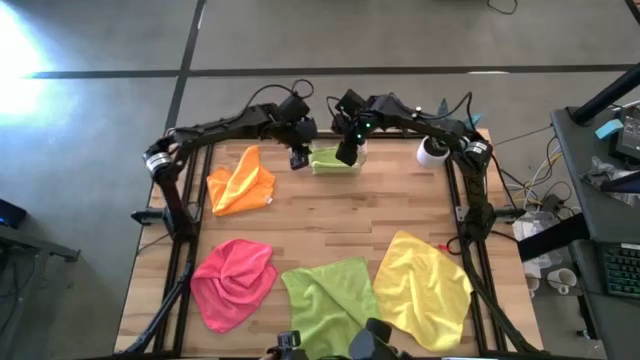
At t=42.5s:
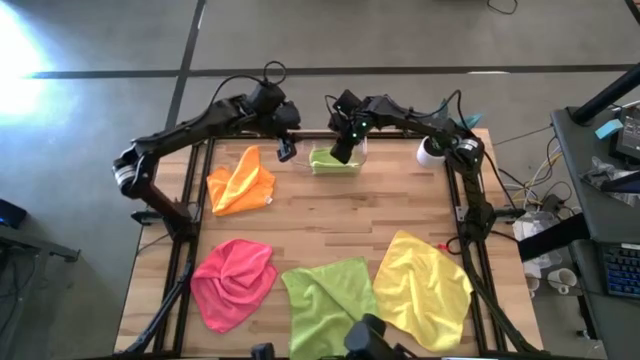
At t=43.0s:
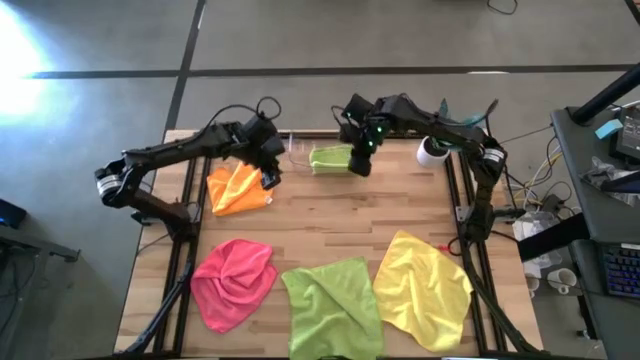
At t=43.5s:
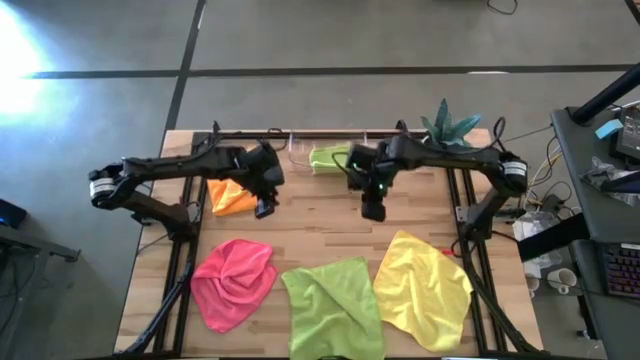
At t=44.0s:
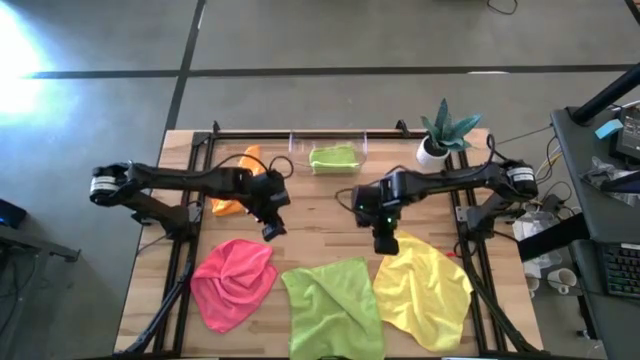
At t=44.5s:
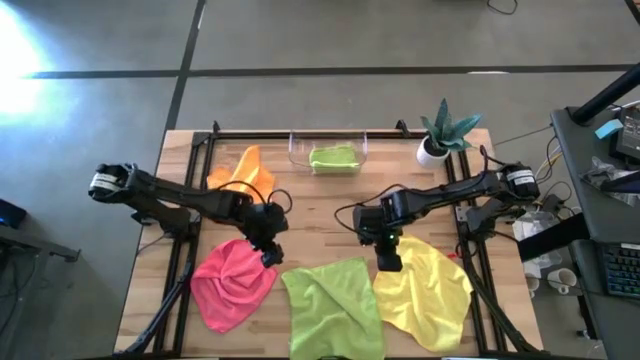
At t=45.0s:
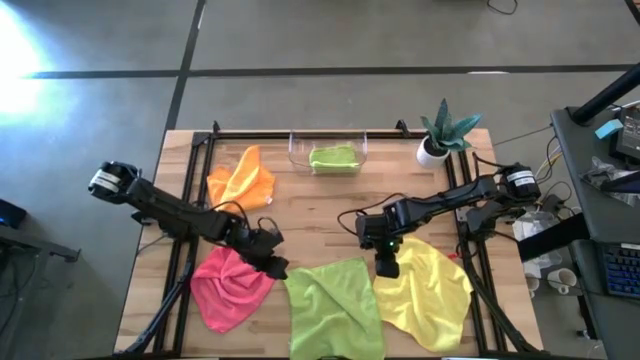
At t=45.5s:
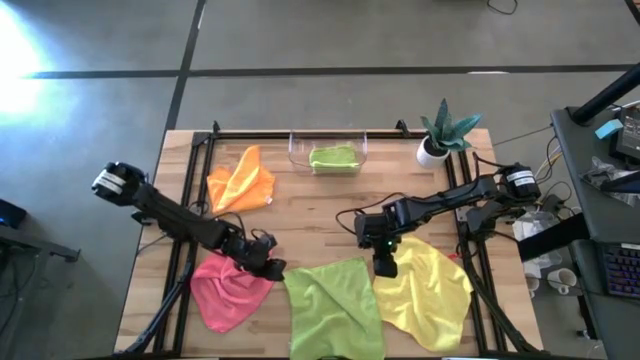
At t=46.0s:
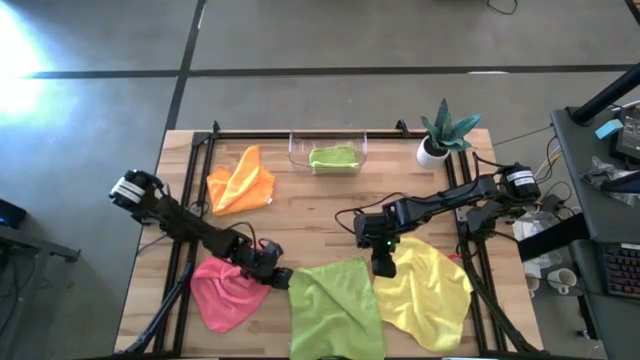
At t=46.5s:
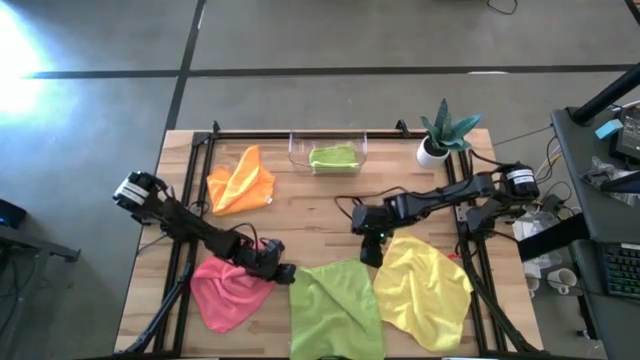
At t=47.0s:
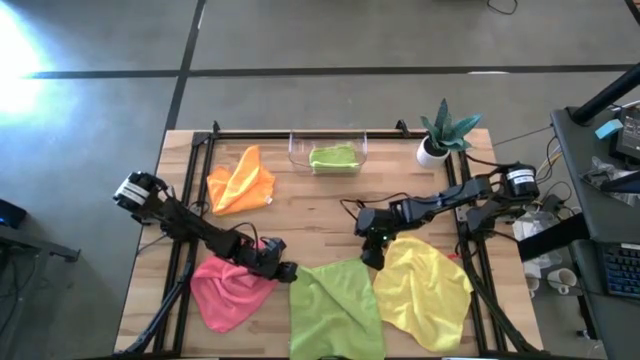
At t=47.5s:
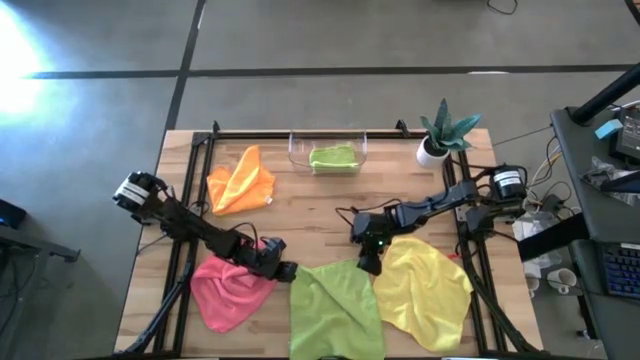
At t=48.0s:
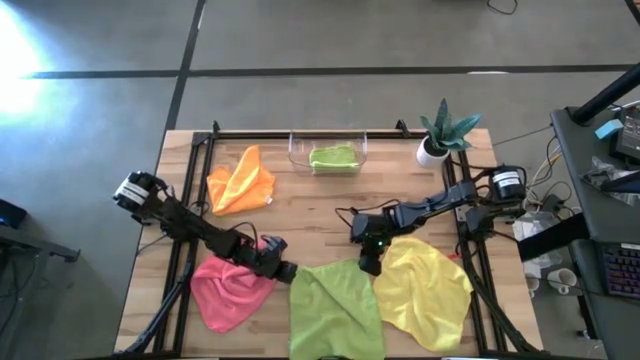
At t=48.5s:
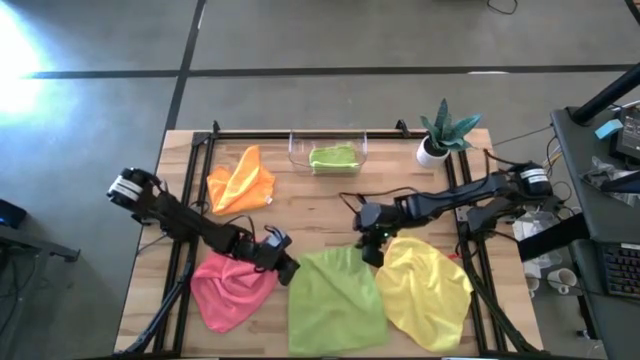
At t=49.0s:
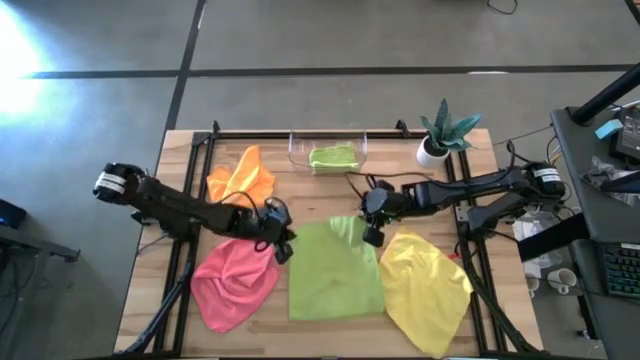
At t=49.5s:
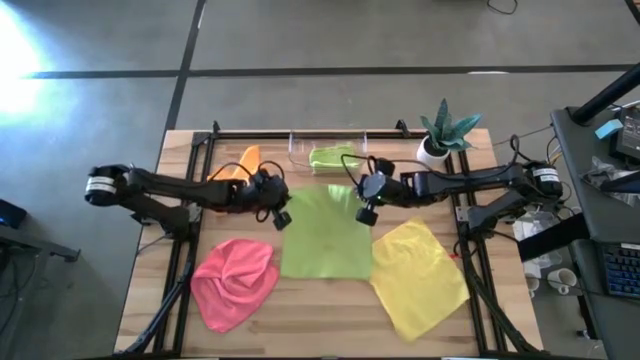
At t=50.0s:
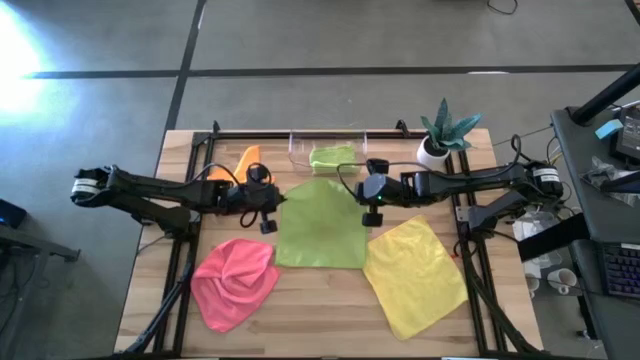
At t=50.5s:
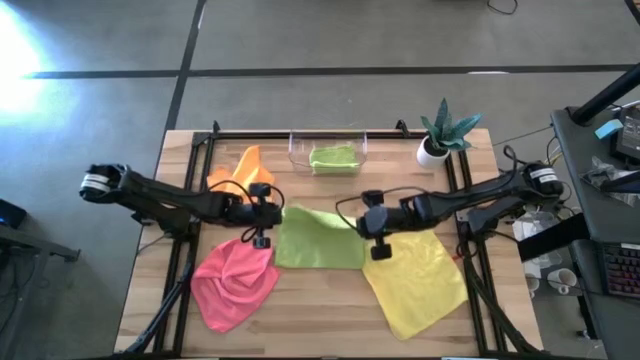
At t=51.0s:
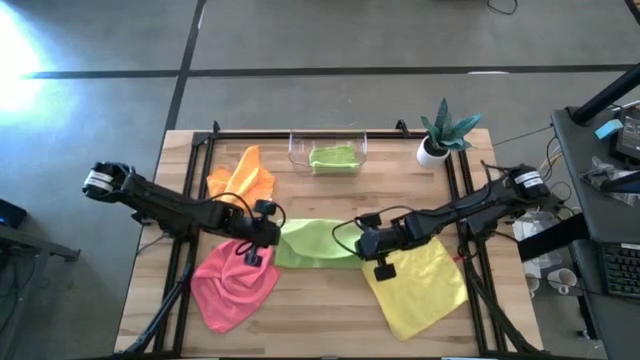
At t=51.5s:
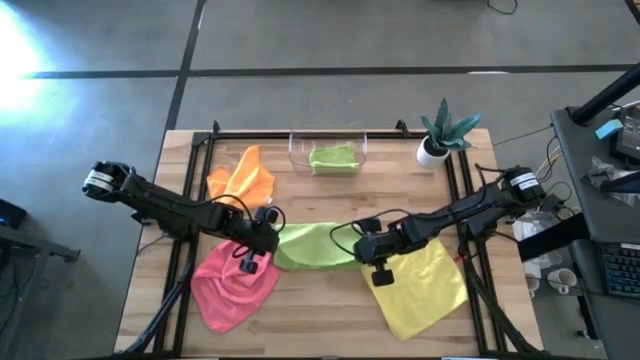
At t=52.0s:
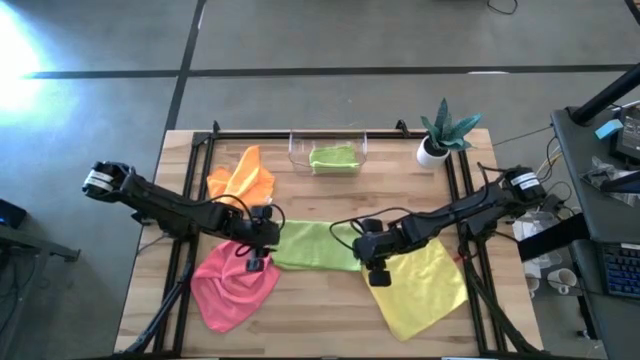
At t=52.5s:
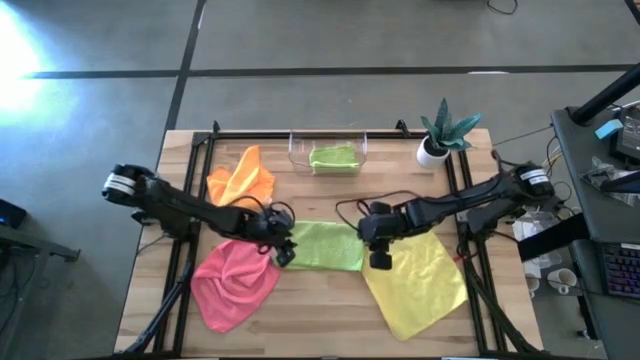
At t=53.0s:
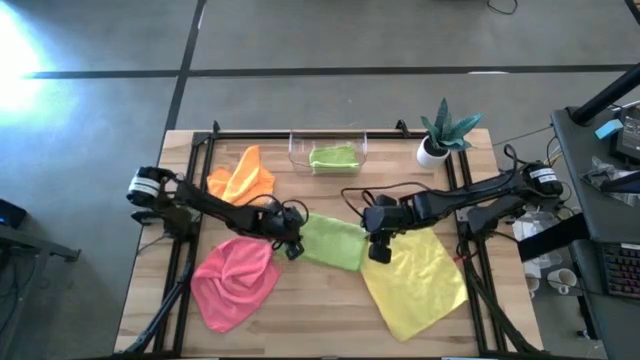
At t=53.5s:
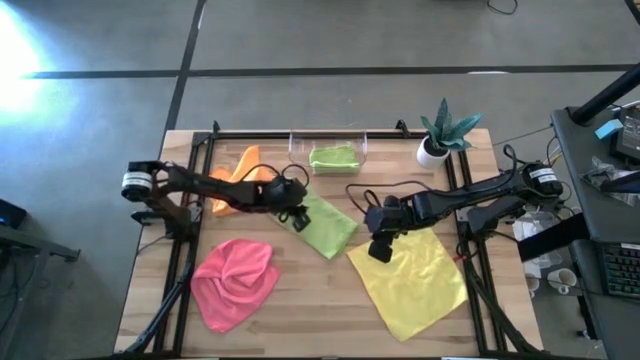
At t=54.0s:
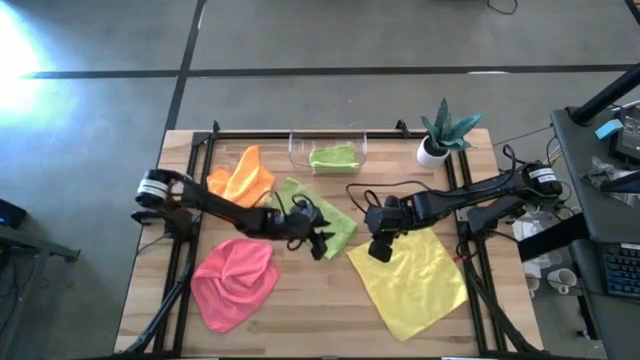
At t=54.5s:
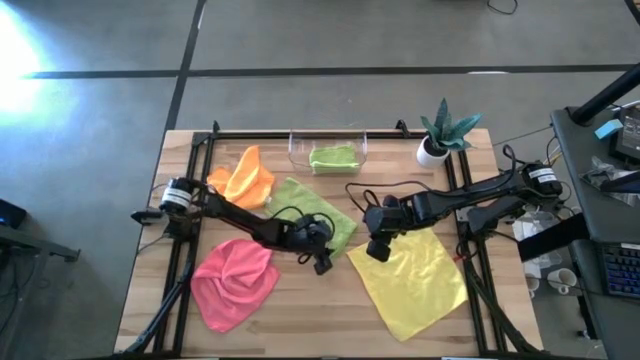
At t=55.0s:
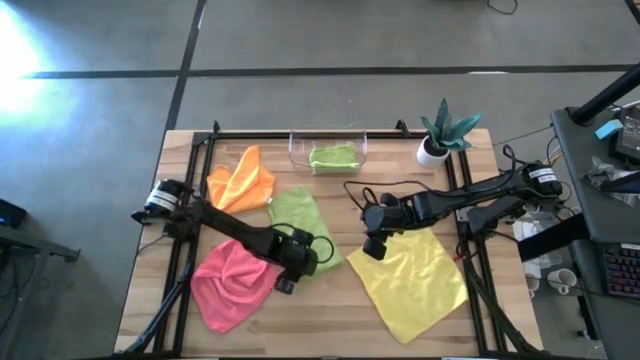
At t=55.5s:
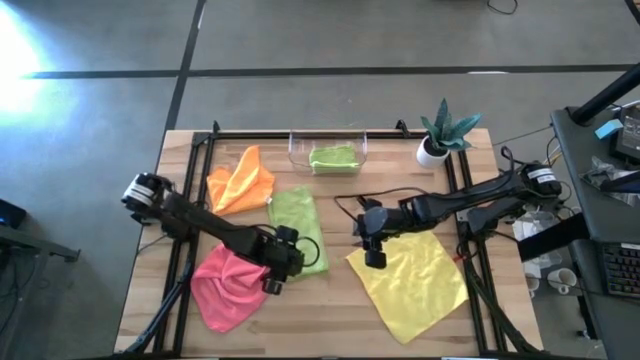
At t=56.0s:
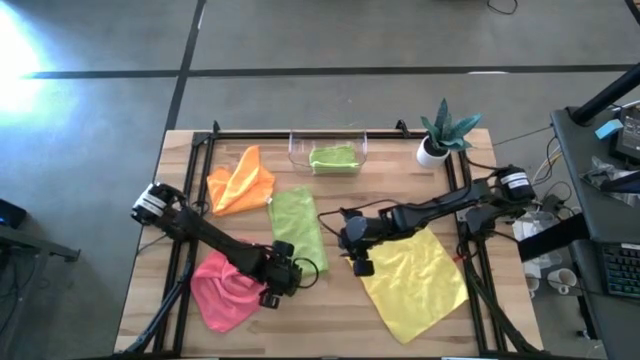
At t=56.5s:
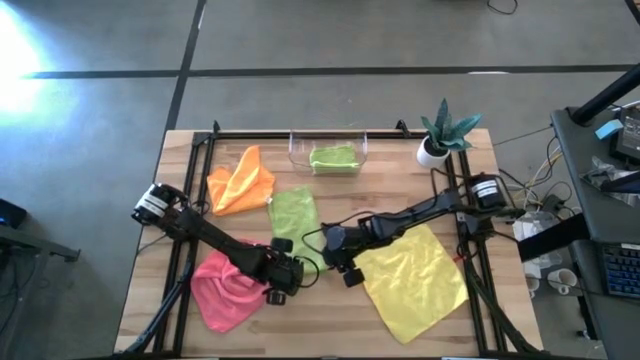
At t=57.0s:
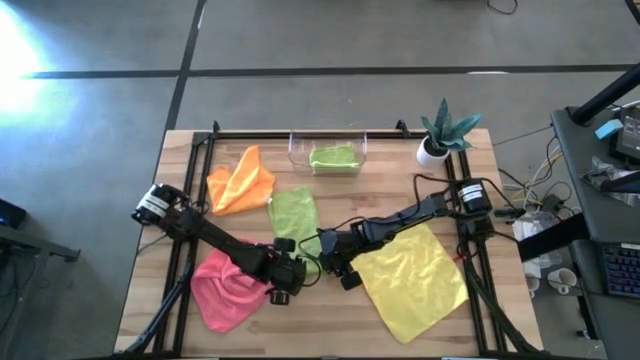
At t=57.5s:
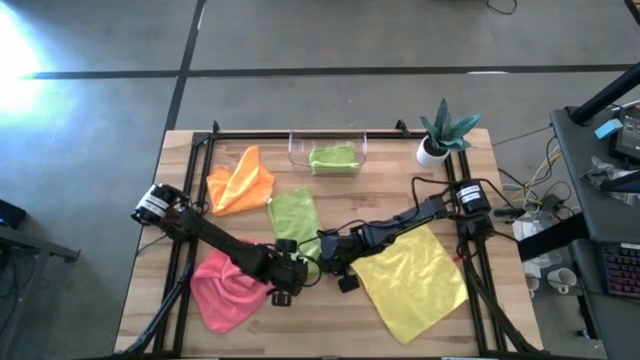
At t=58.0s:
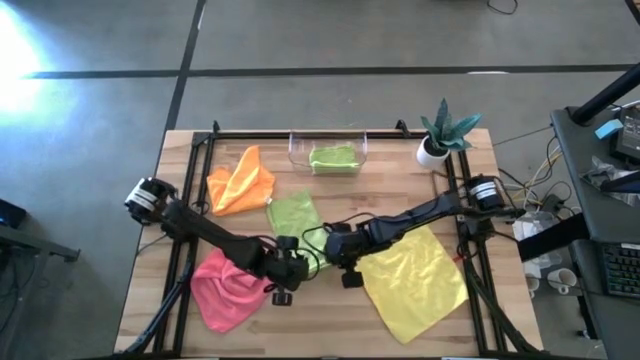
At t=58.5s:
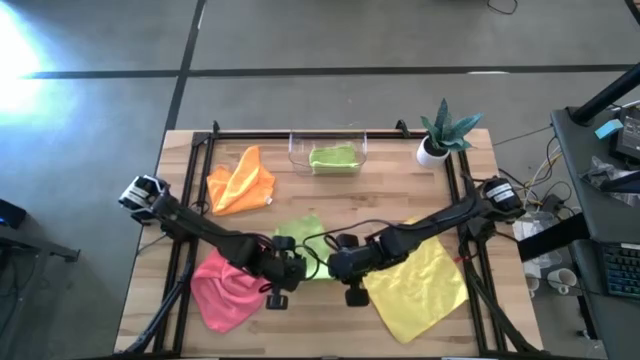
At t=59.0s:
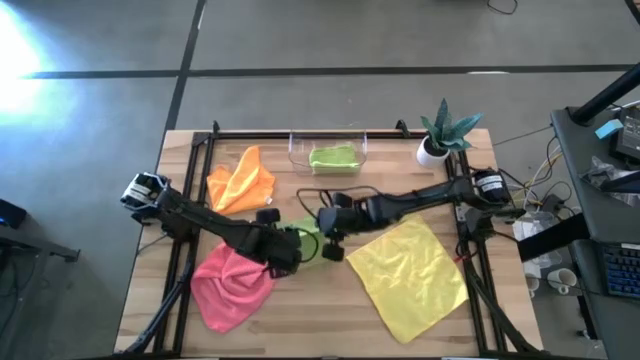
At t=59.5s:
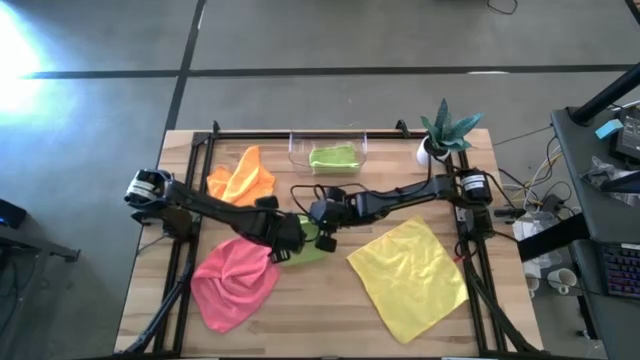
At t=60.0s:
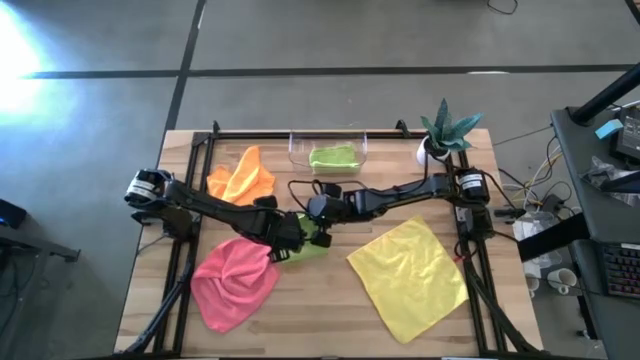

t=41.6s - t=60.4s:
Task: Fold microfiber towels
Fold the green microfiber towel on the table

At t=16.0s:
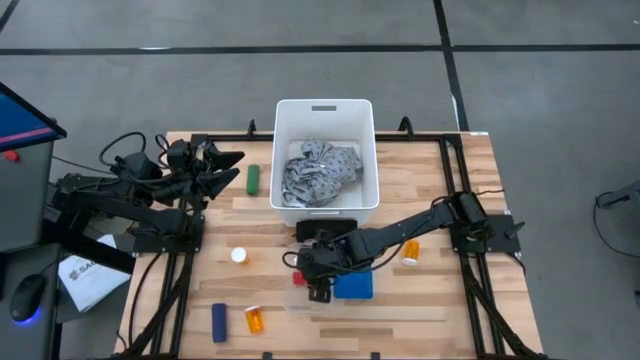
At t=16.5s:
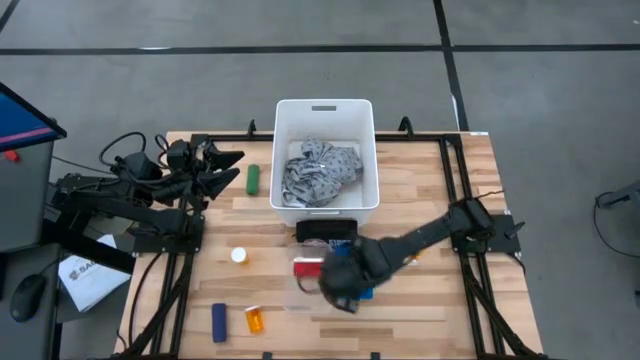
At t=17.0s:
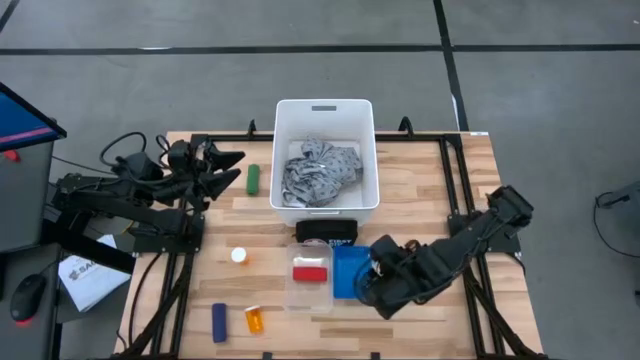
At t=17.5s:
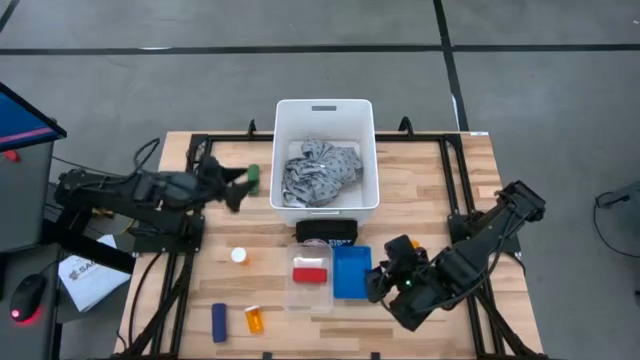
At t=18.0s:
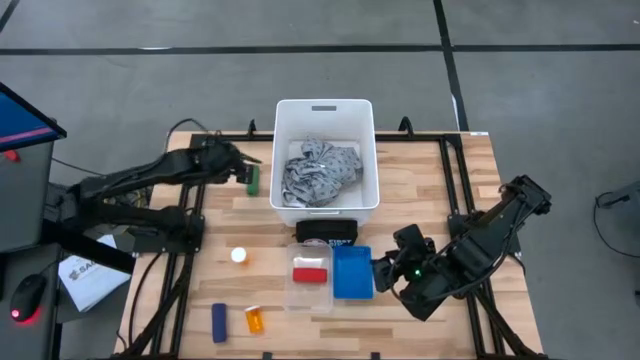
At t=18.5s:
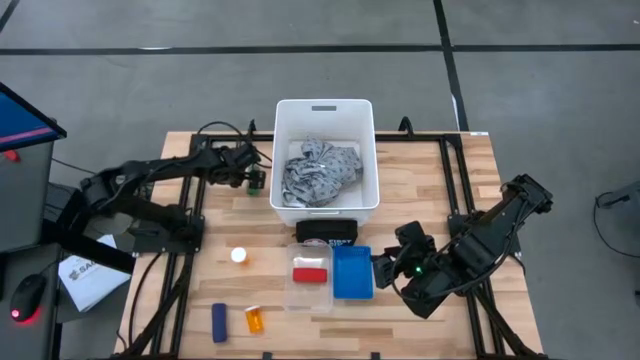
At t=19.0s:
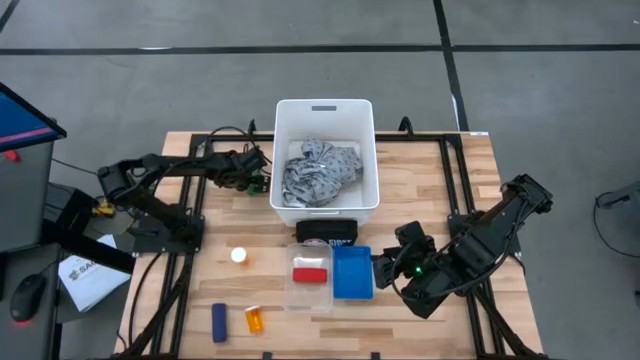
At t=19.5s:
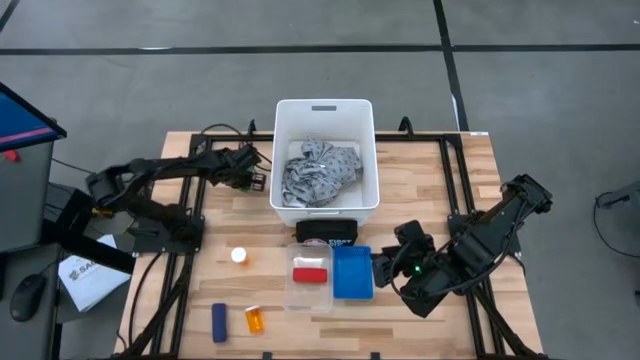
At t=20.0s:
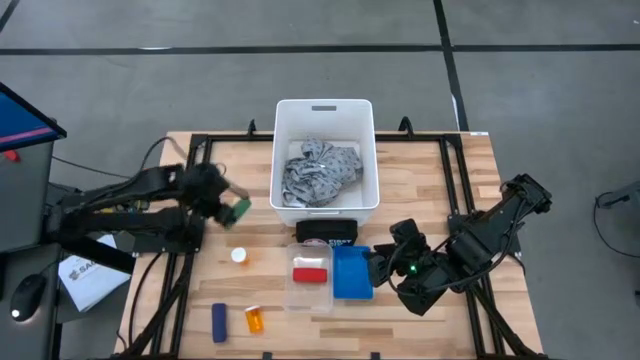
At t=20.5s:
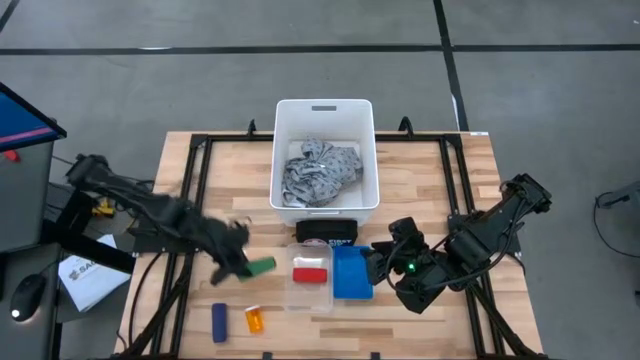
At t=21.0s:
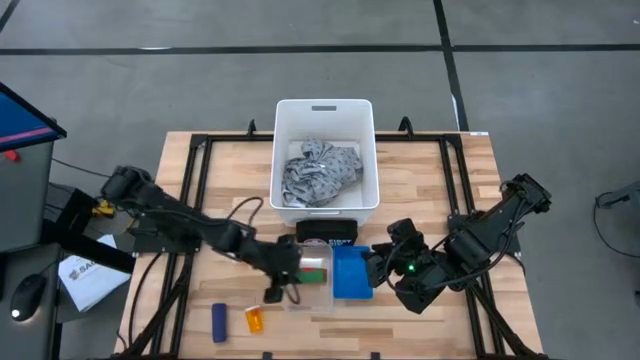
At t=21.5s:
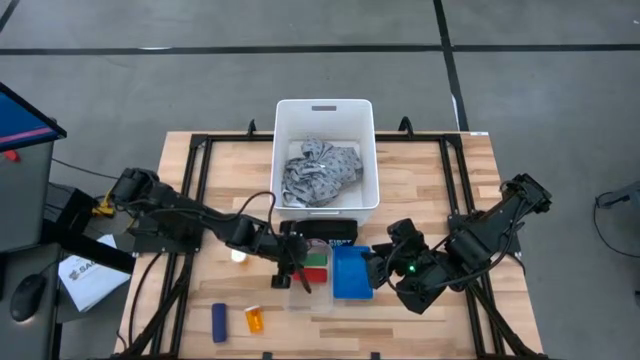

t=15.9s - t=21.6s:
Task: Pick & place medical supplies in basket/bin
Put the green bandage into the transparent bin
